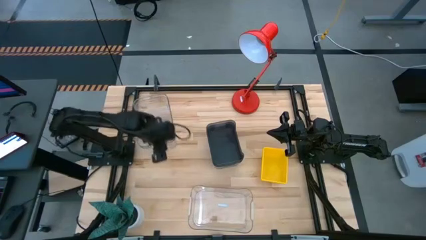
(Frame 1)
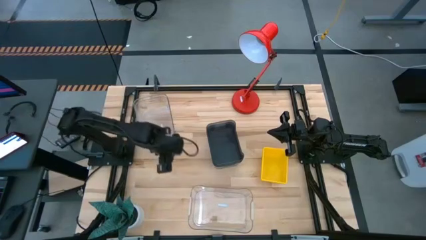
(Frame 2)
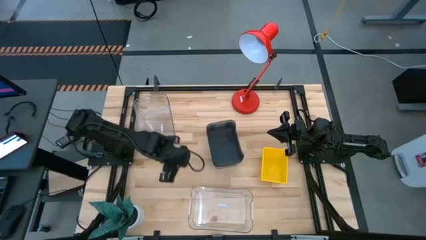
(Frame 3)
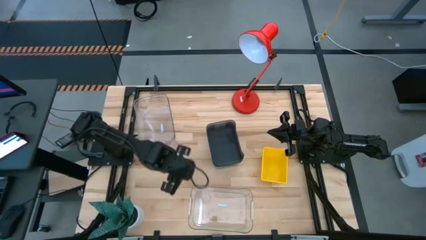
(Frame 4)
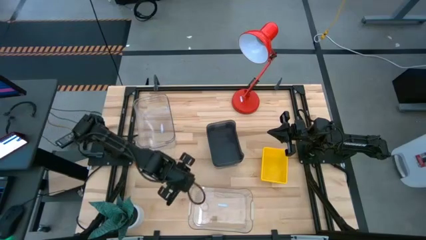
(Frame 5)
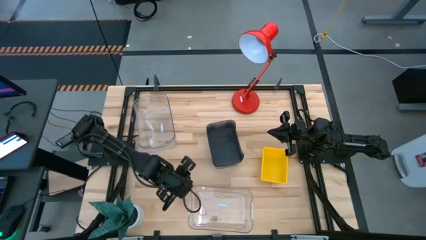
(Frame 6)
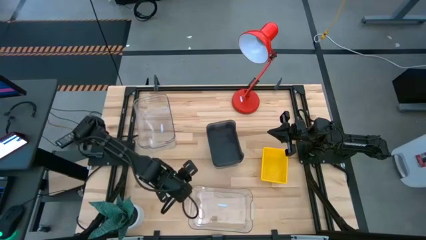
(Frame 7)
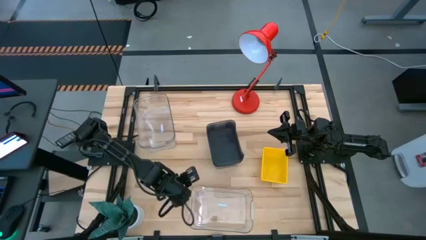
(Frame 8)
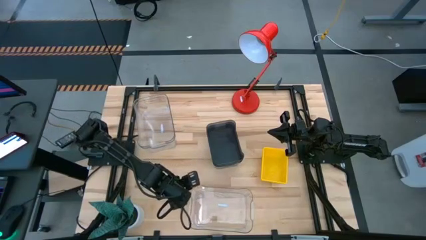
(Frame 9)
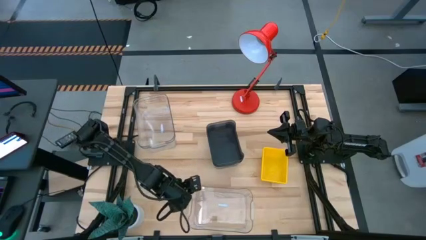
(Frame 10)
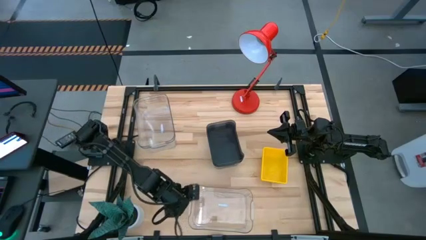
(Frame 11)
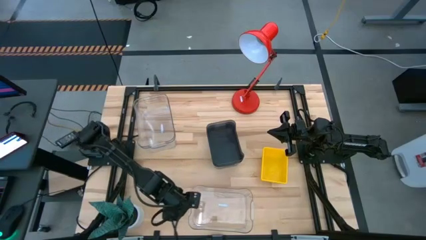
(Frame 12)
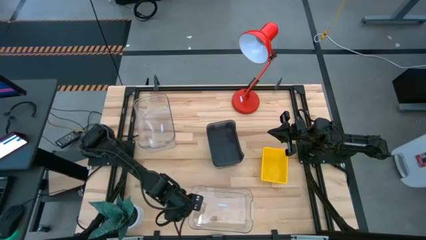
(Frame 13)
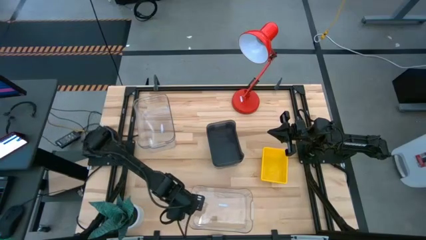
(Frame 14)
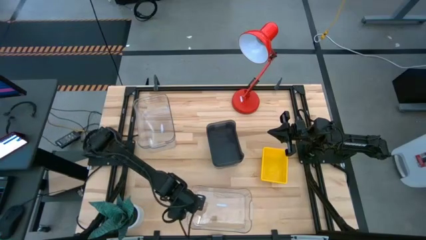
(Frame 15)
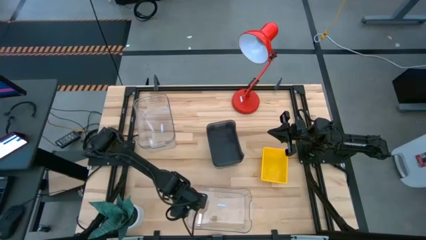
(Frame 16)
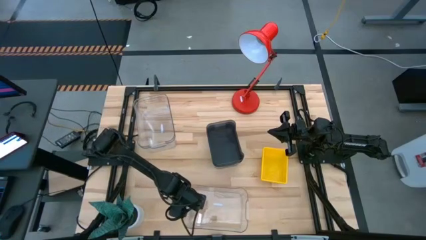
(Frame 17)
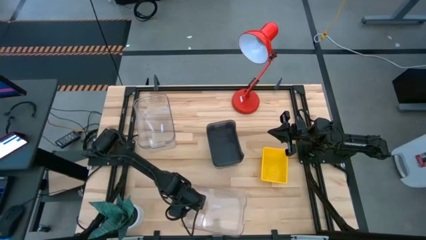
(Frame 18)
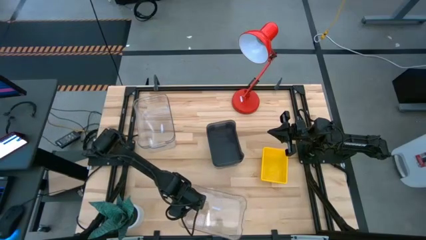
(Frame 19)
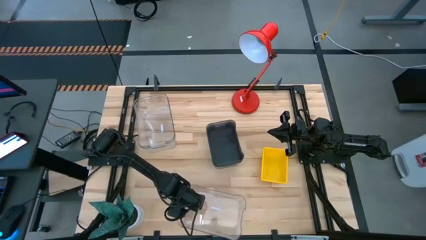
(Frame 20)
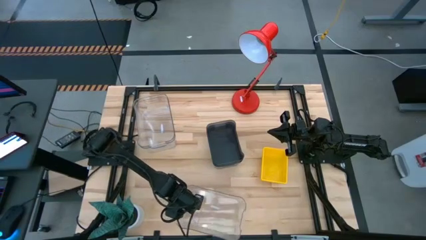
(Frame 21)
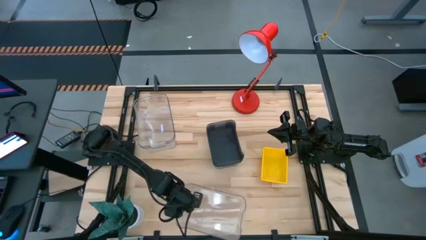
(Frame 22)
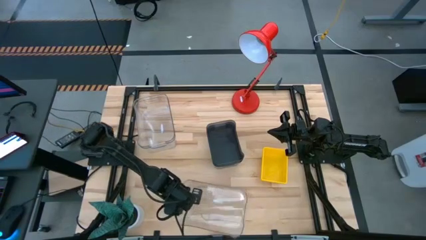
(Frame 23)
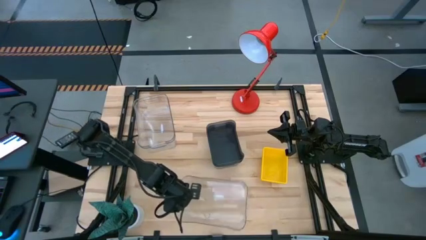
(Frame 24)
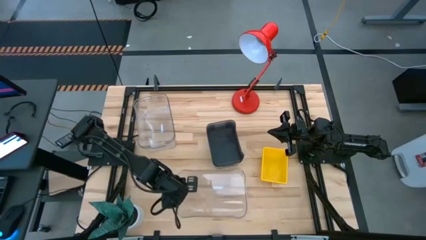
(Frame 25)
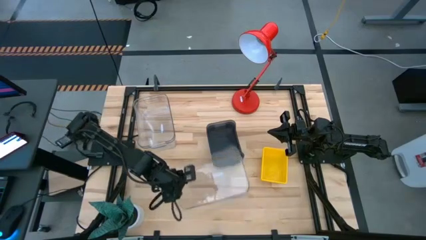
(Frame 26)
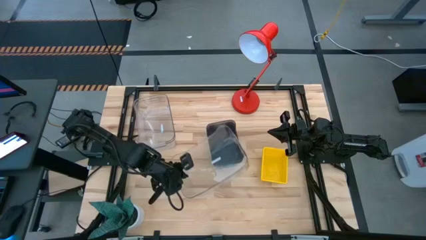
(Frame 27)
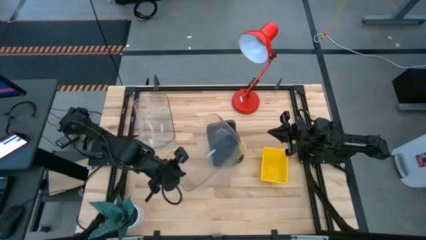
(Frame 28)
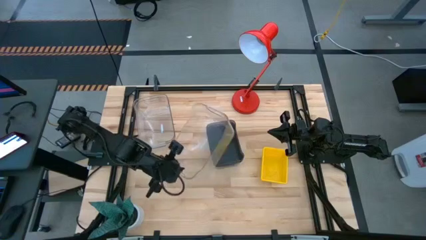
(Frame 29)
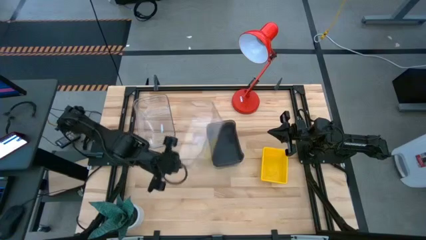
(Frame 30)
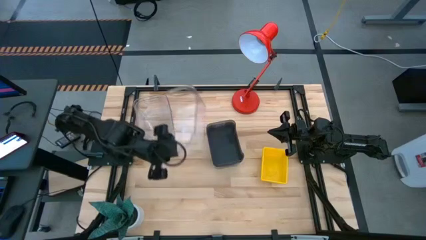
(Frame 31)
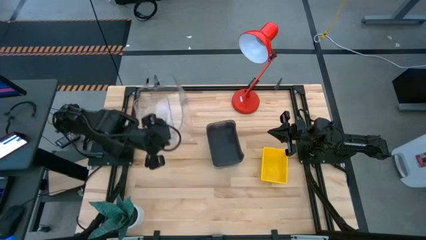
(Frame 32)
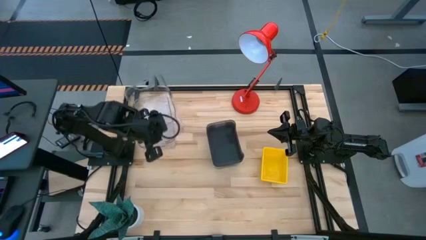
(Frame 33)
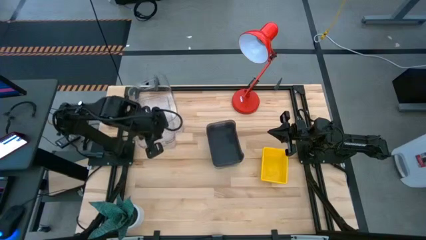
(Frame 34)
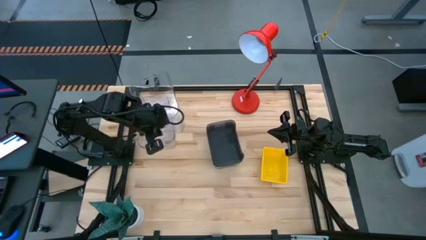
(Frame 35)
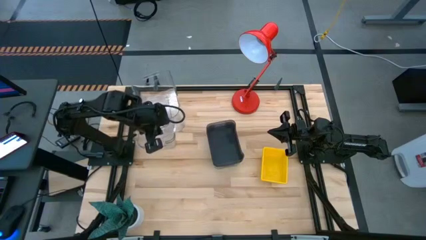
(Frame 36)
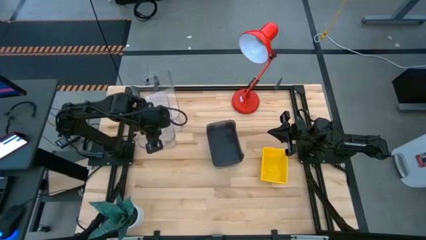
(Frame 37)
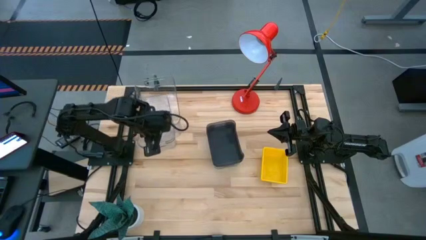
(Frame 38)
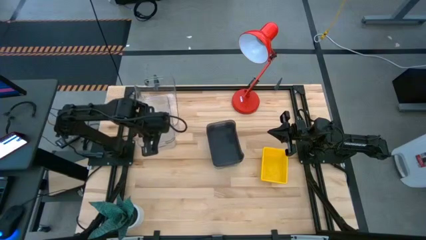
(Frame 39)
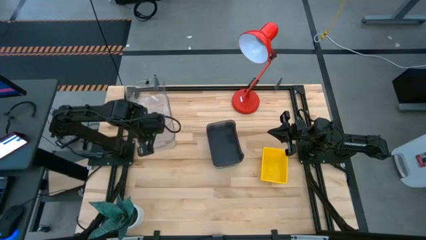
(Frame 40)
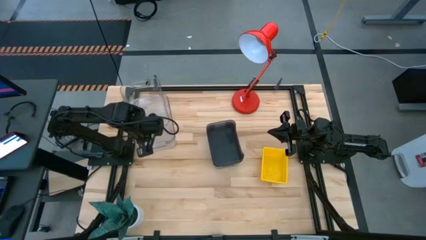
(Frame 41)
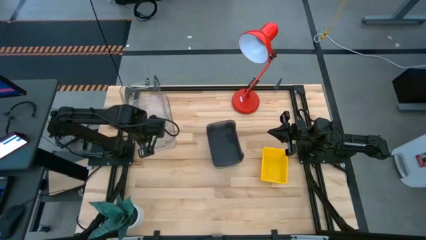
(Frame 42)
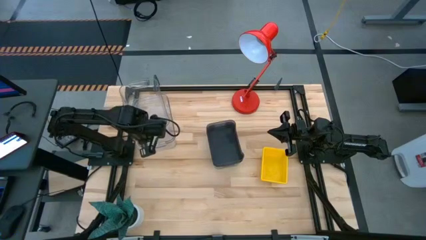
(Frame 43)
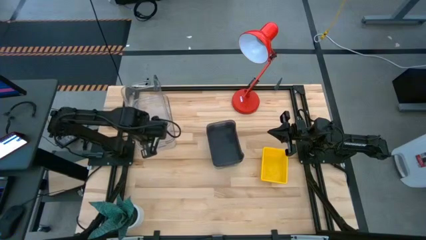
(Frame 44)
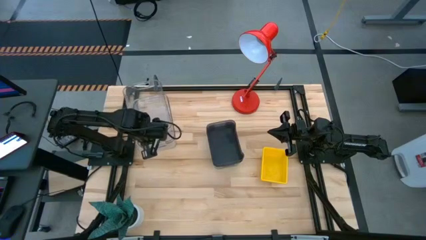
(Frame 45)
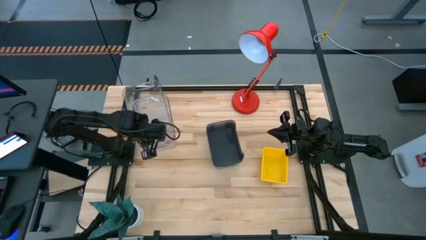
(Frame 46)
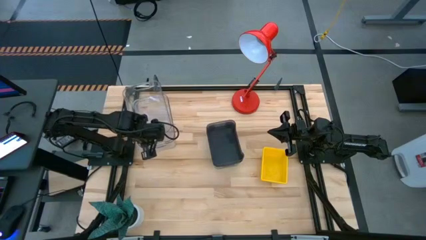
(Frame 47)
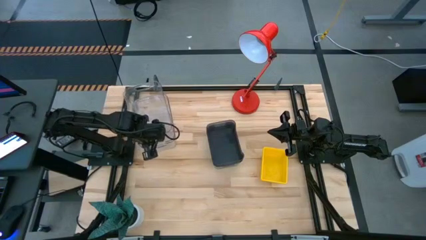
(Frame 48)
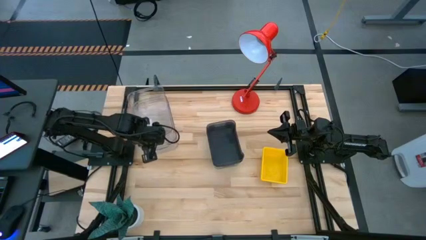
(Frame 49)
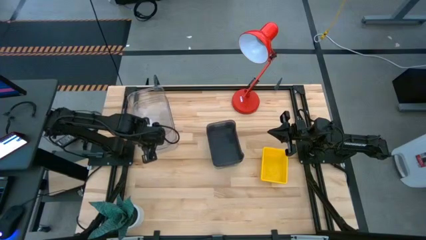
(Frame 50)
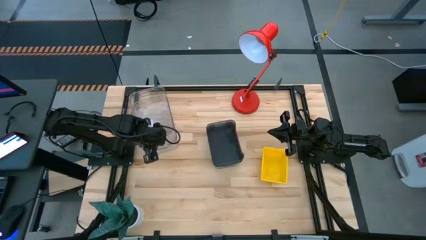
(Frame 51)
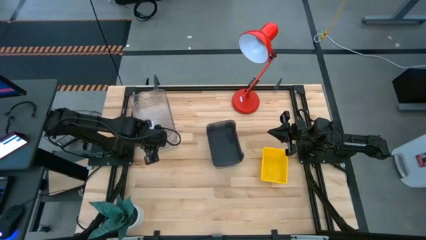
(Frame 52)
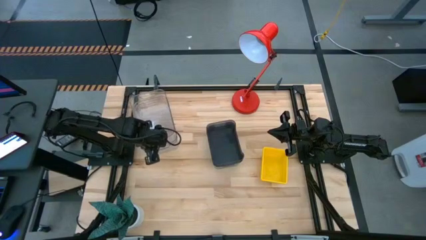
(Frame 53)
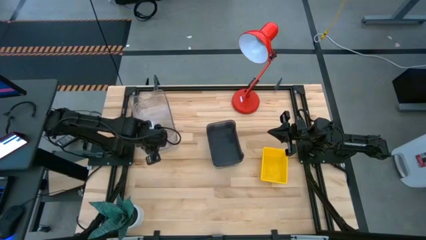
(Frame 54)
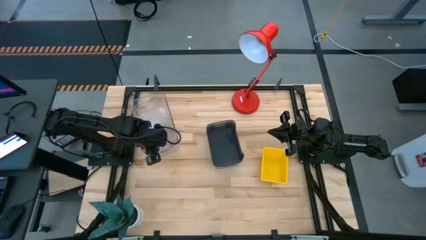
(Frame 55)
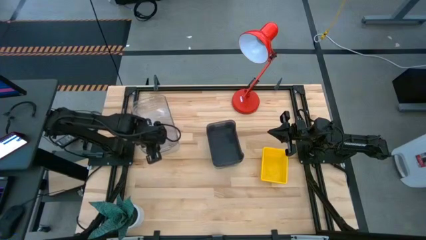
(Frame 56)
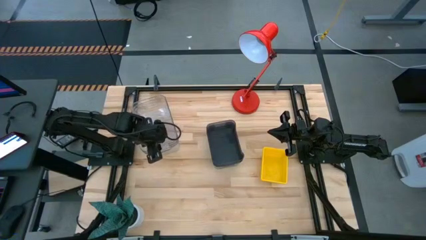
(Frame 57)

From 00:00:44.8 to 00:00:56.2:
Stack the bottom transparent bin on the top transparent bin
